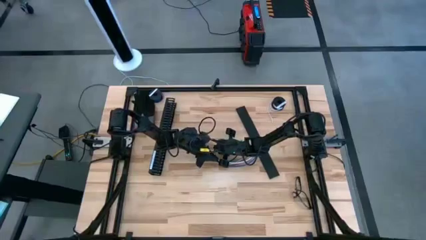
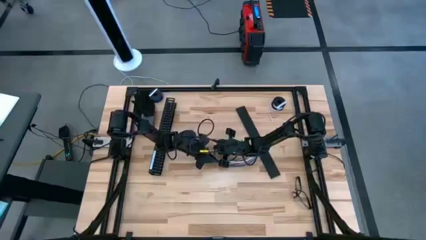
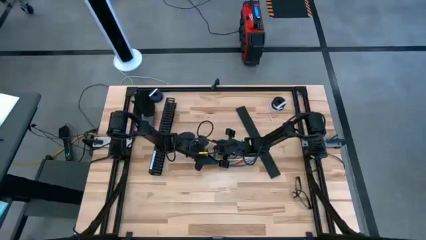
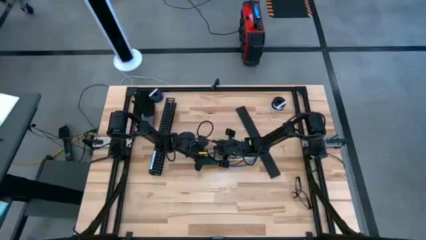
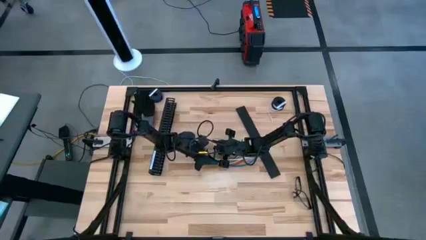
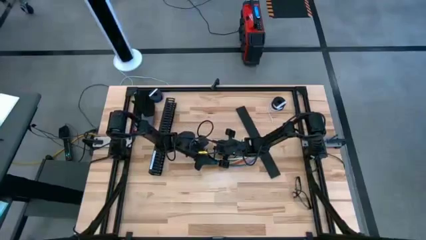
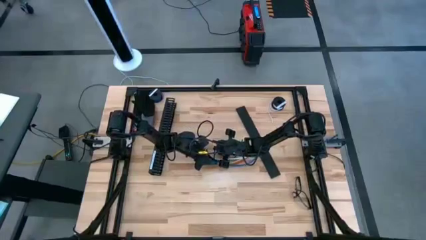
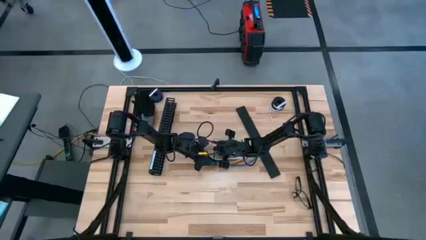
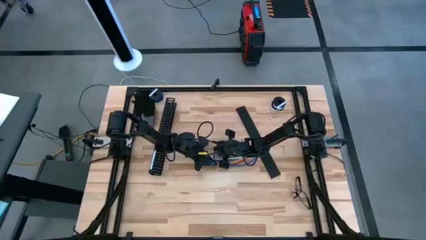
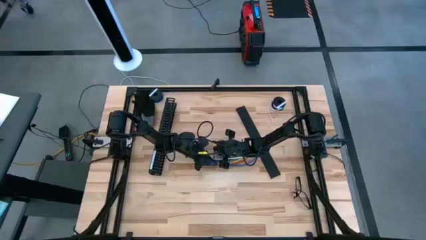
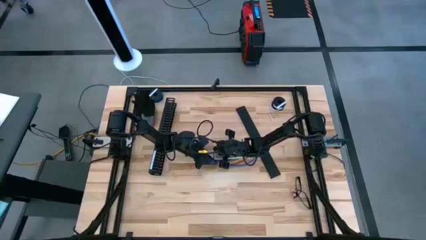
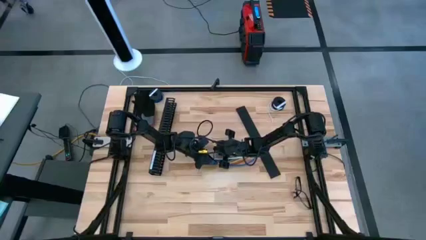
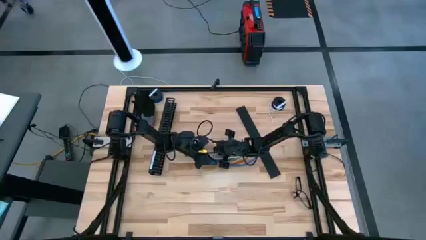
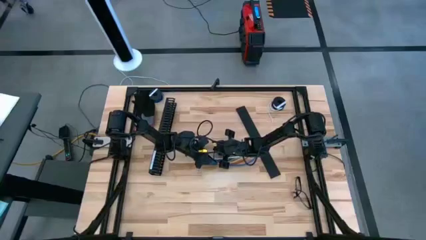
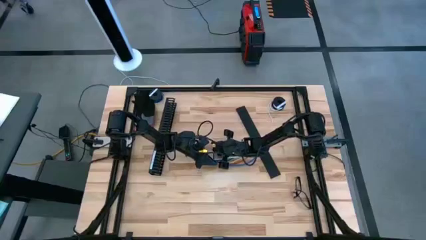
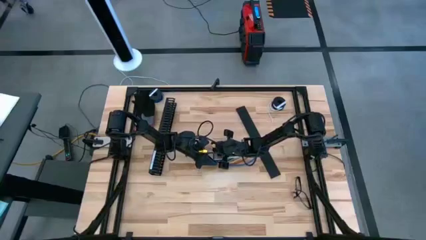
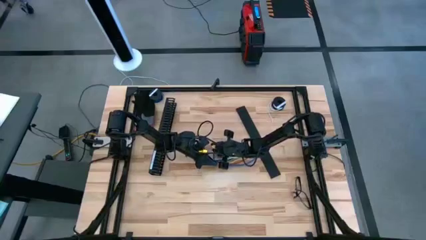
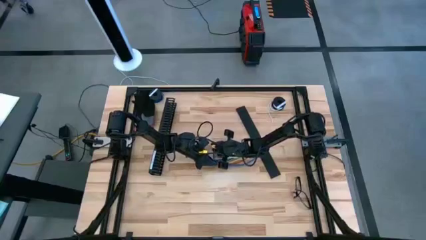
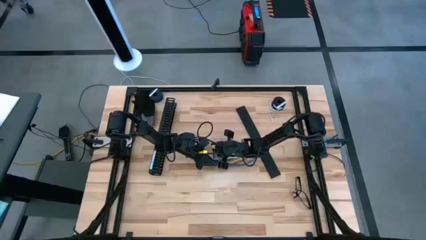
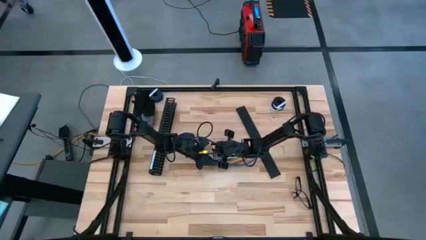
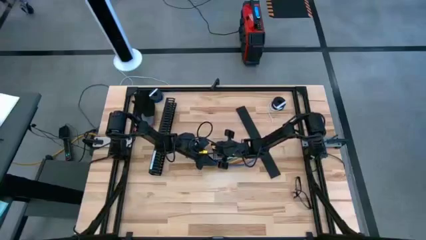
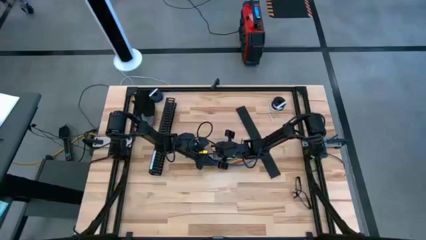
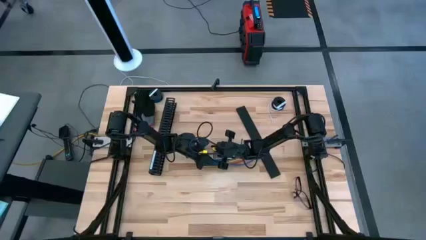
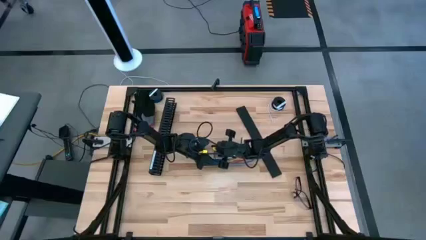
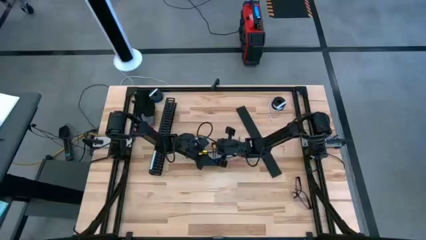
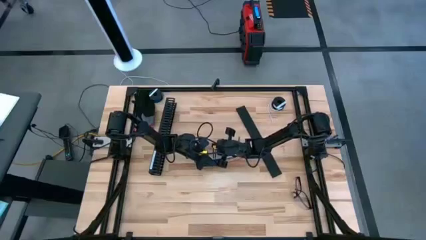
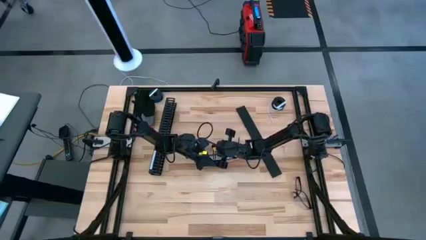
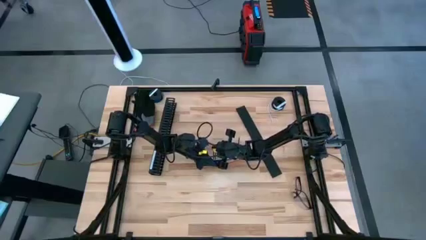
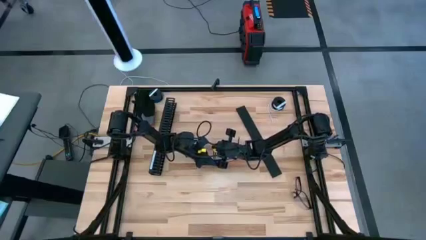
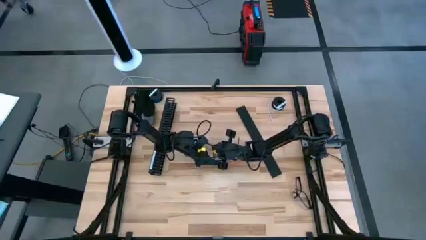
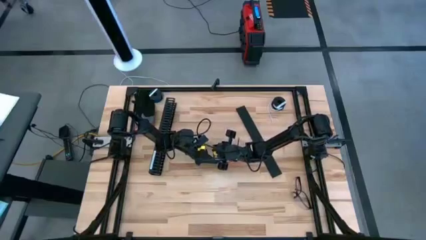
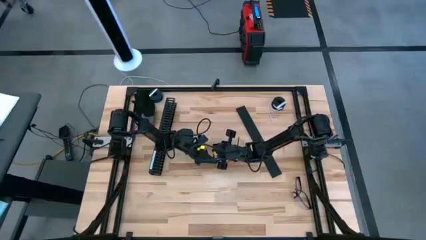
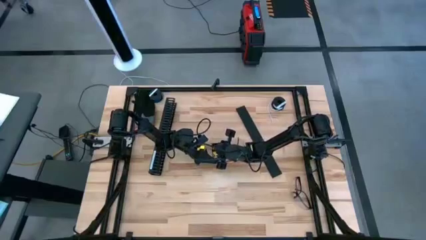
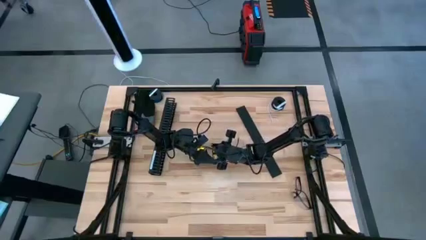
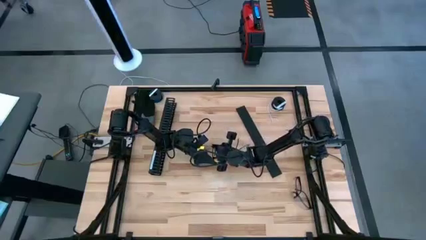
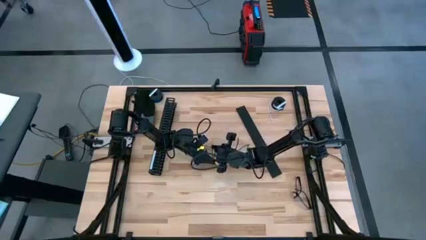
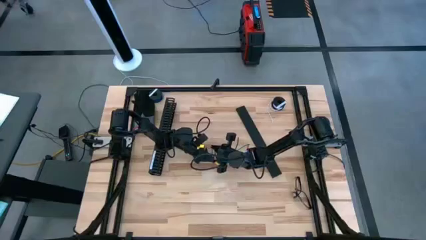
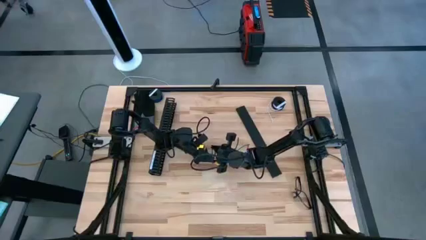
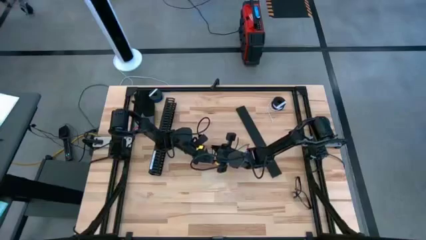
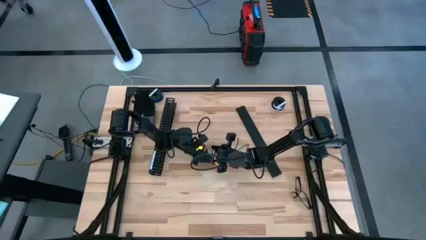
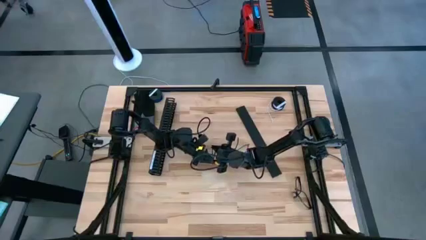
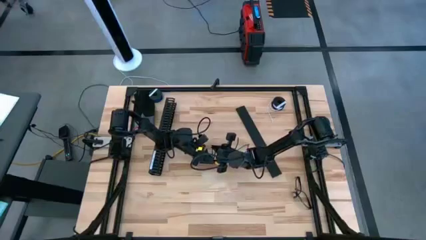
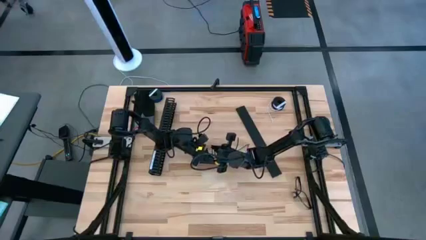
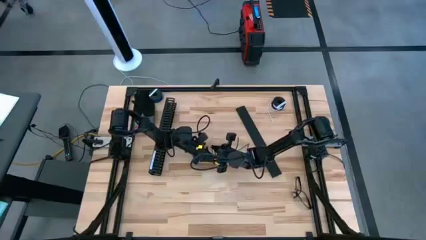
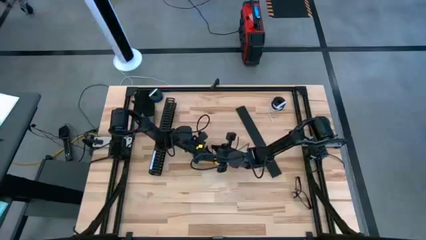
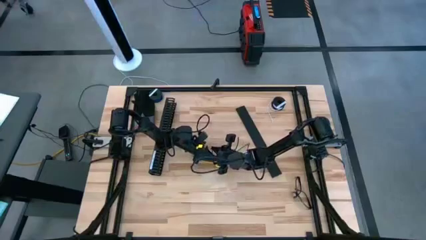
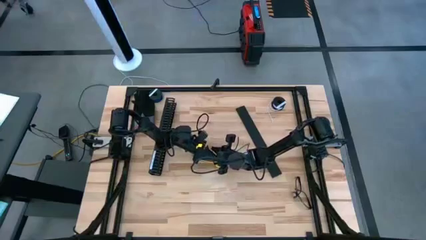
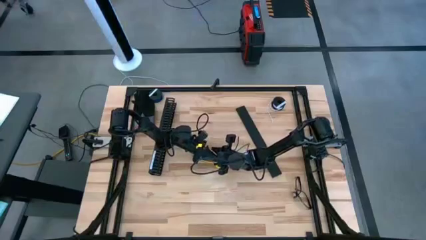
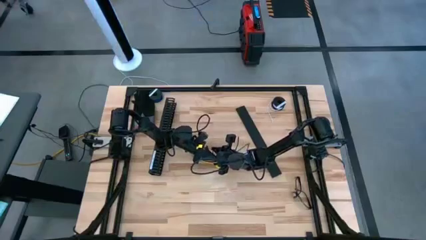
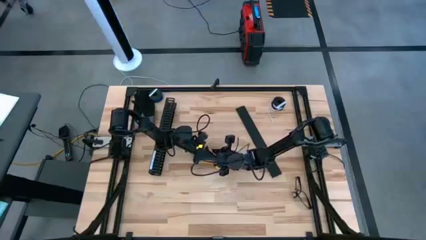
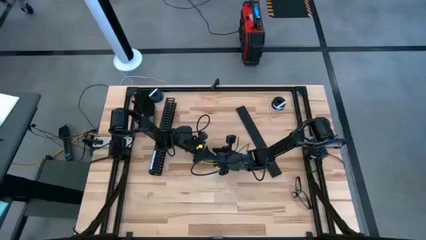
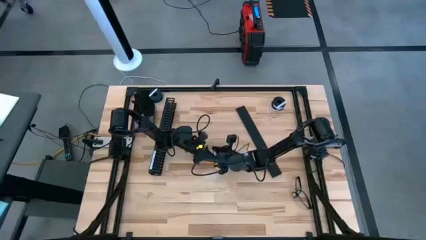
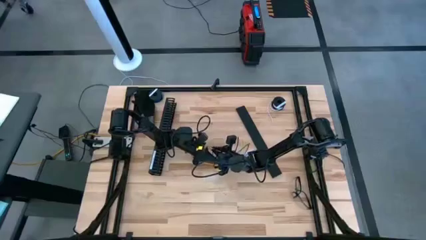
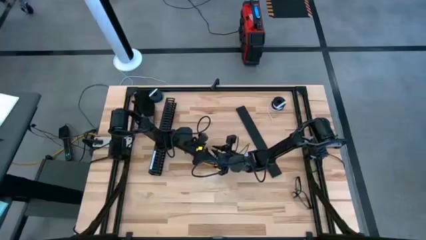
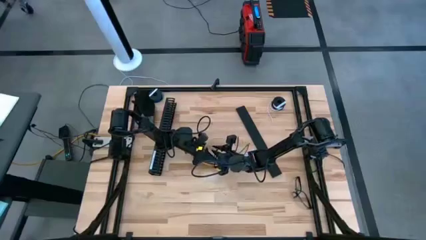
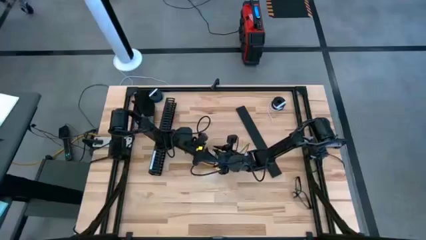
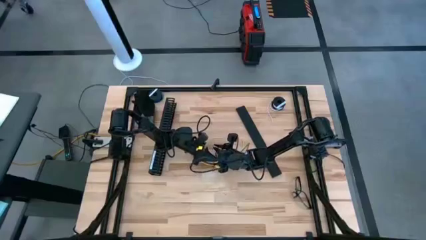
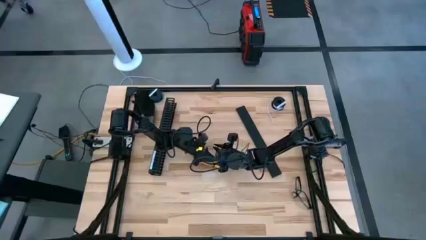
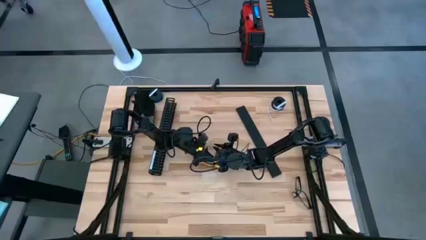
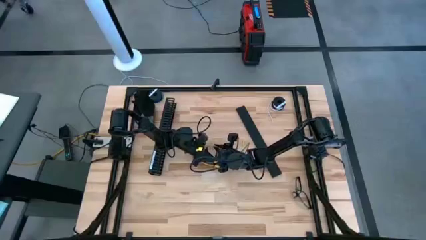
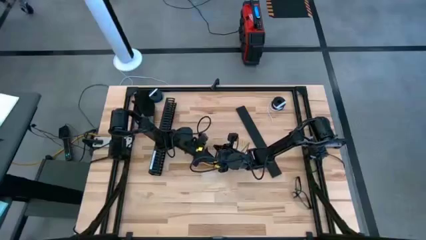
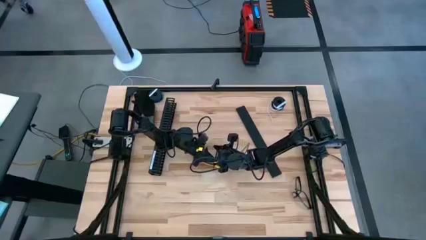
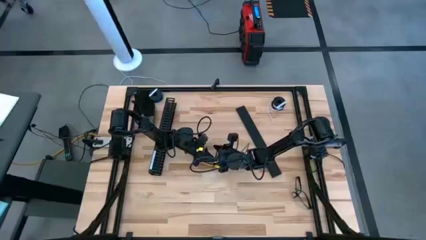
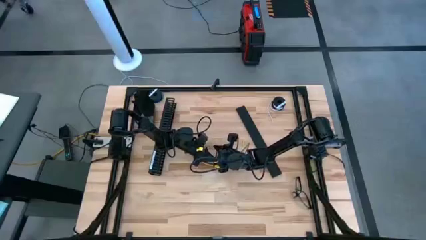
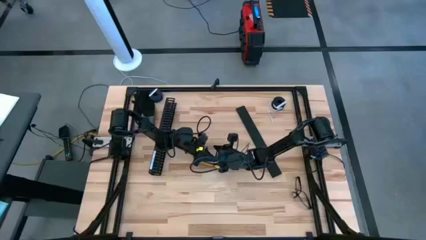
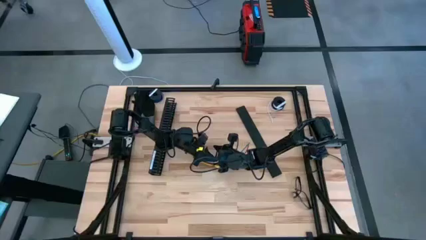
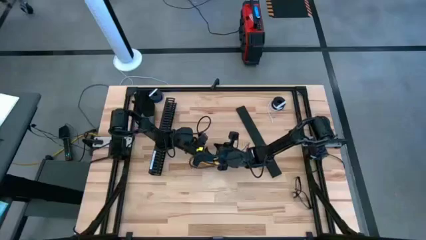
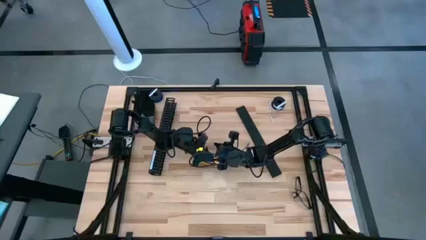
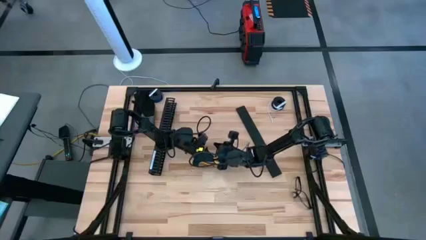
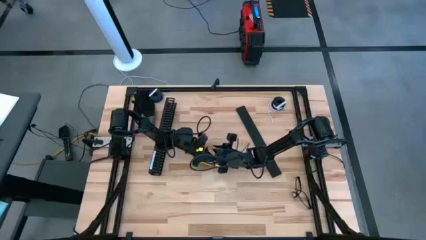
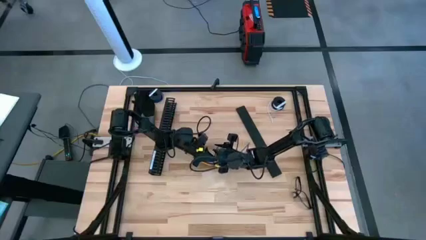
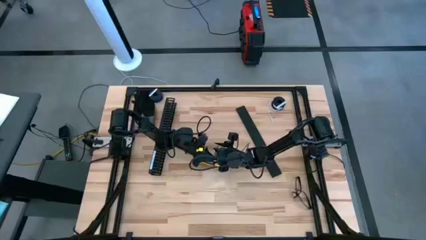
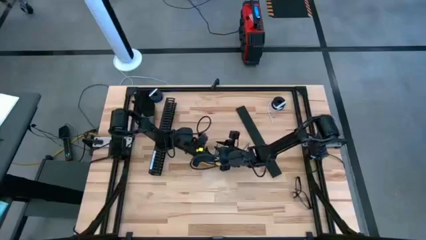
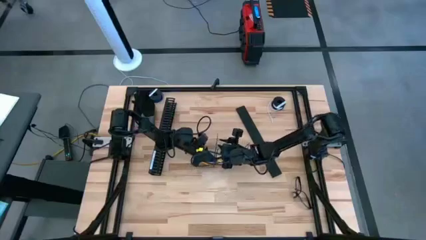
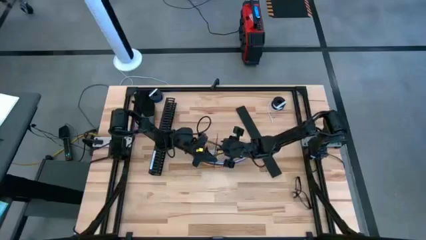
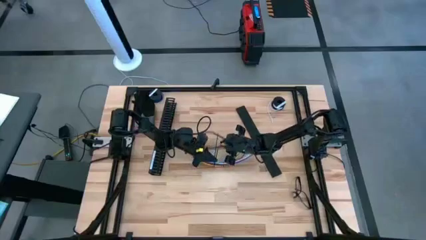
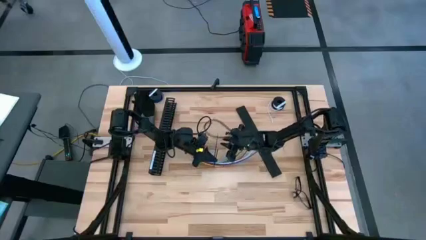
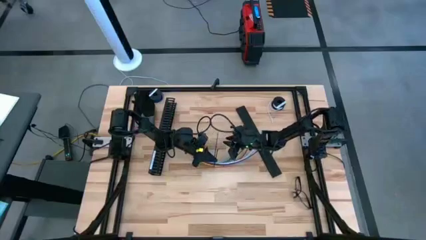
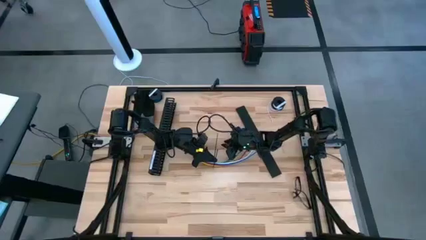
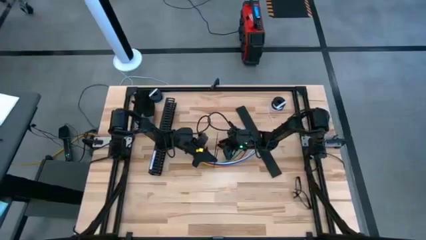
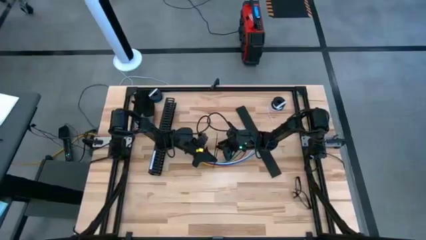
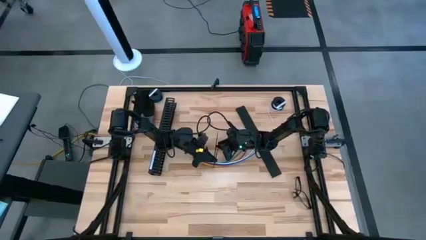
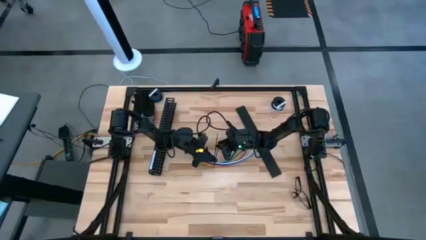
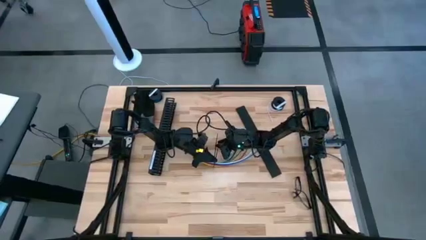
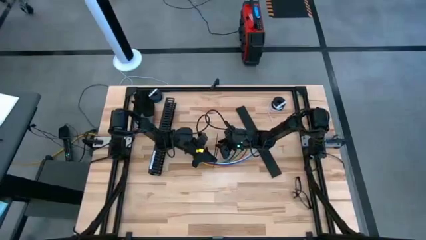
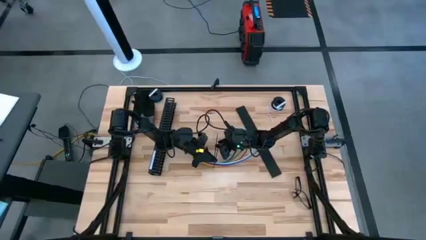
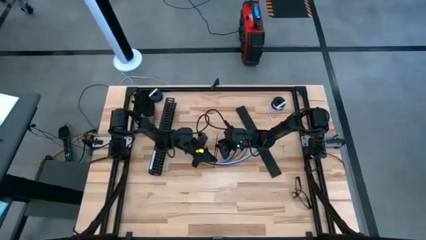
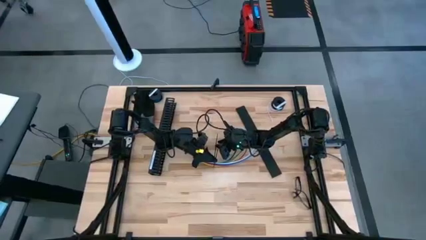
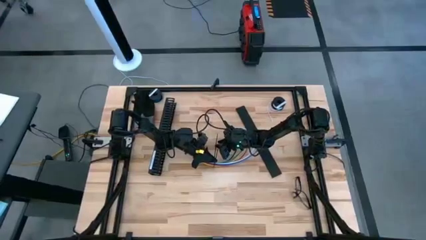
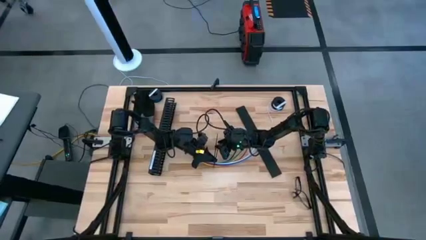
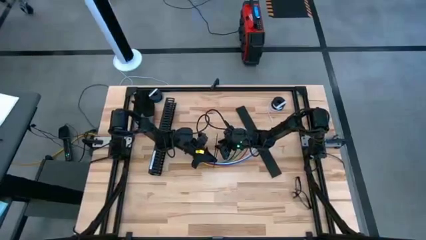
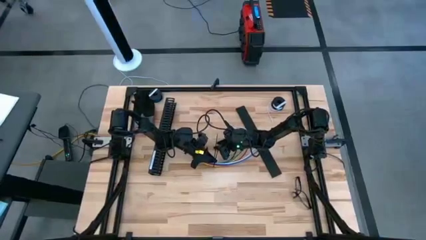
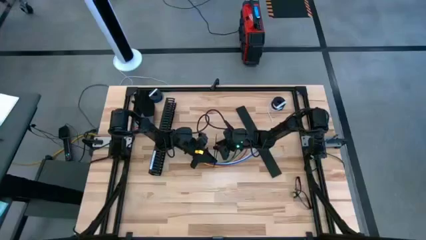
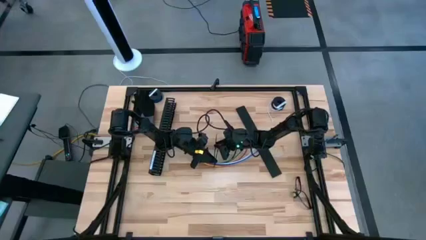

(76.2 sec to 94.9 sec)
Task: Ziptie cables
Wrap the black zip tie on the cable
